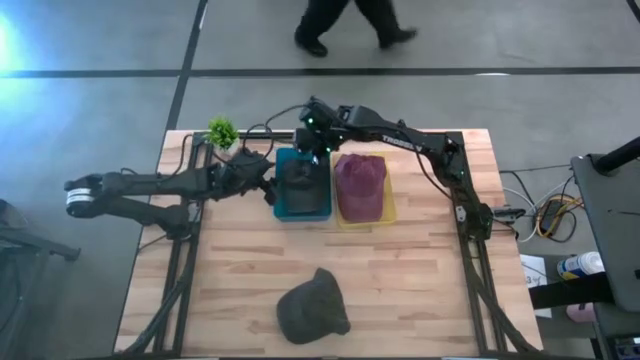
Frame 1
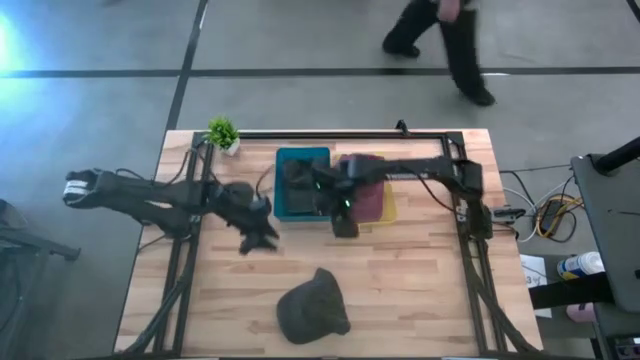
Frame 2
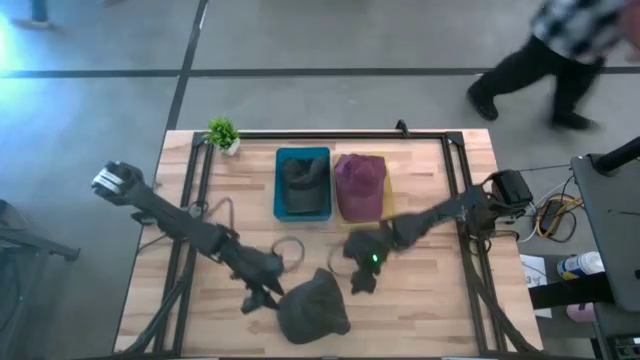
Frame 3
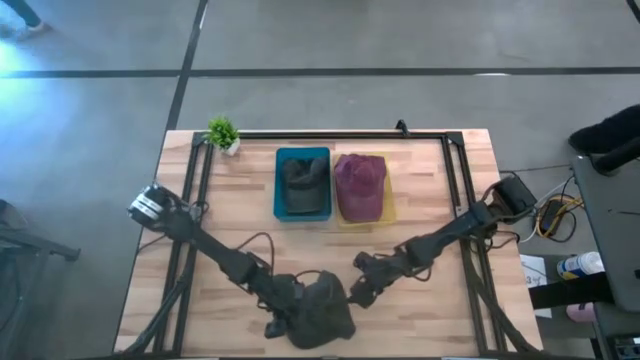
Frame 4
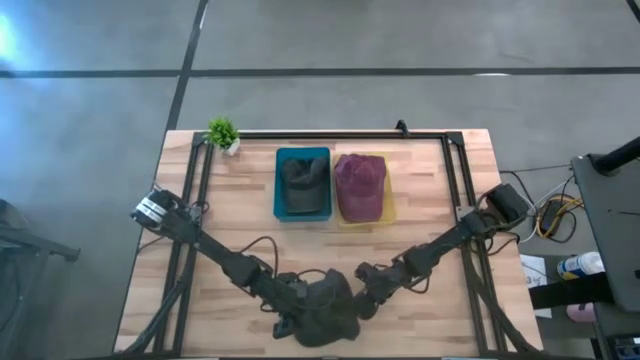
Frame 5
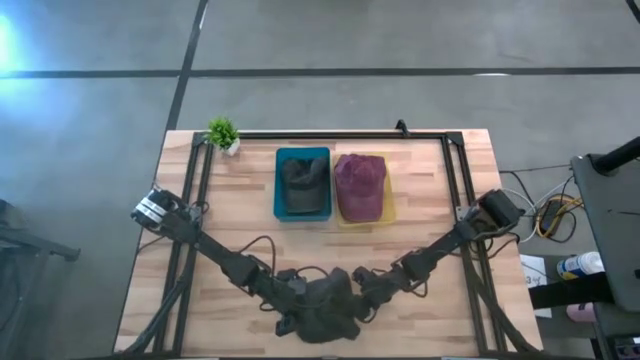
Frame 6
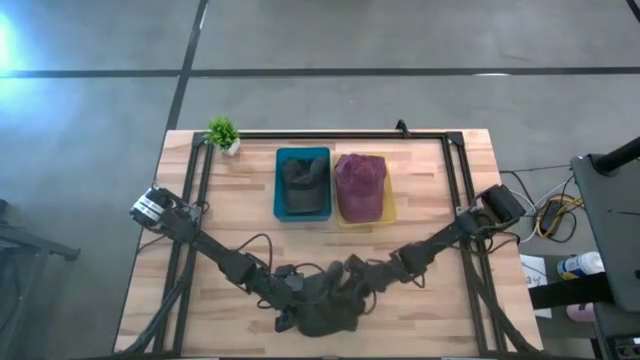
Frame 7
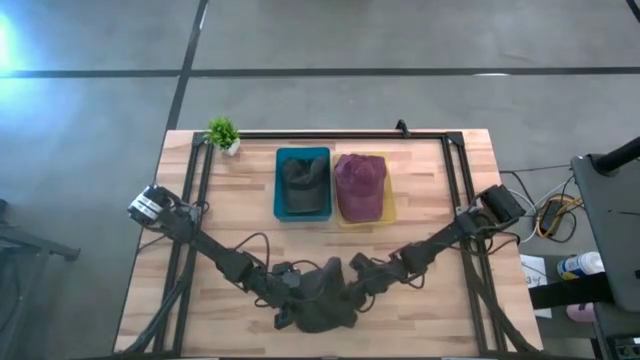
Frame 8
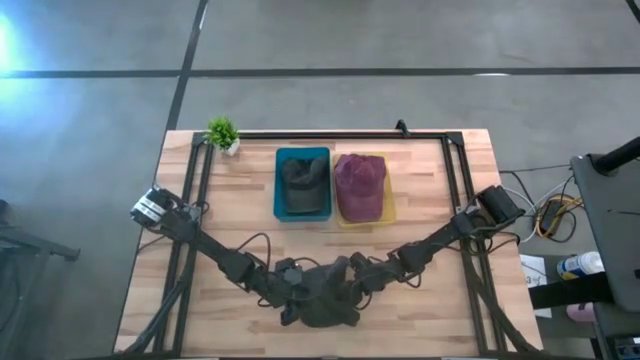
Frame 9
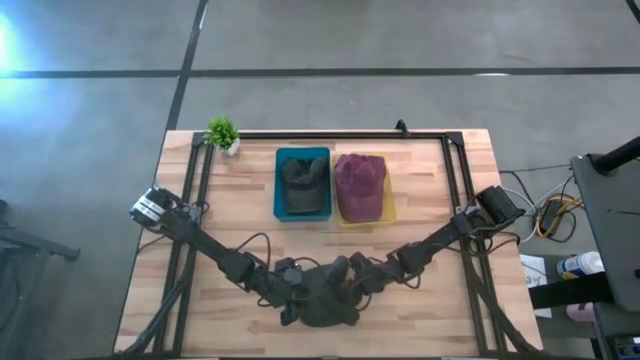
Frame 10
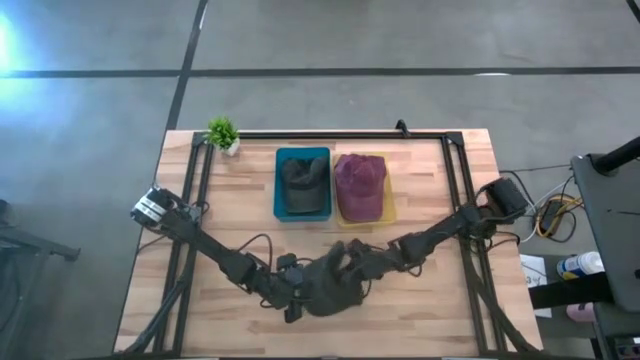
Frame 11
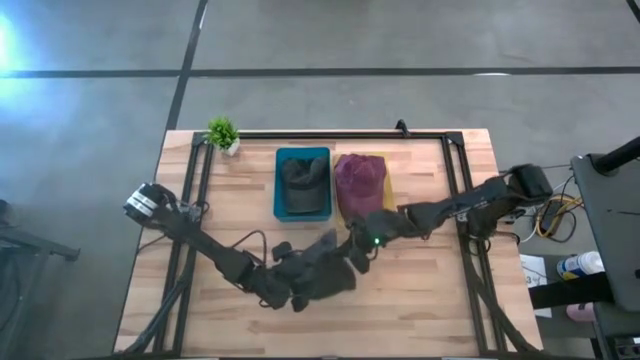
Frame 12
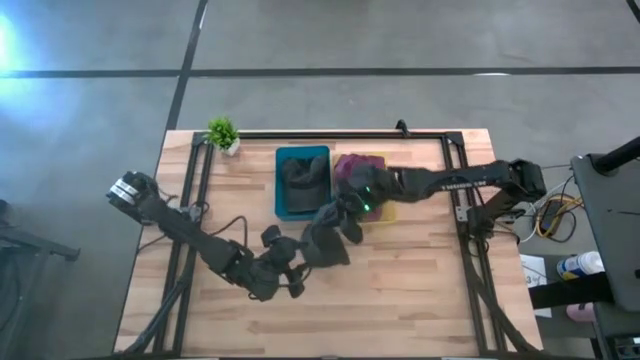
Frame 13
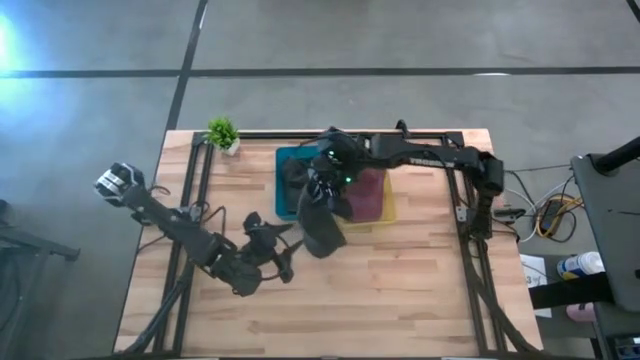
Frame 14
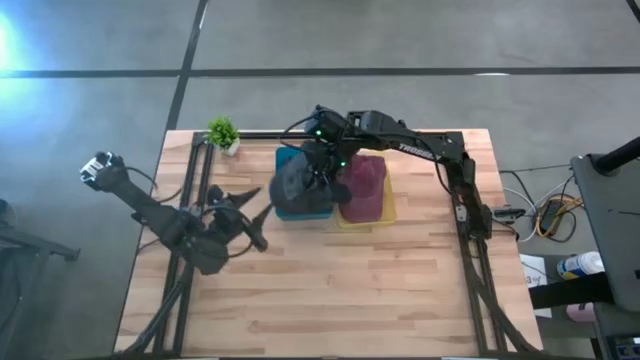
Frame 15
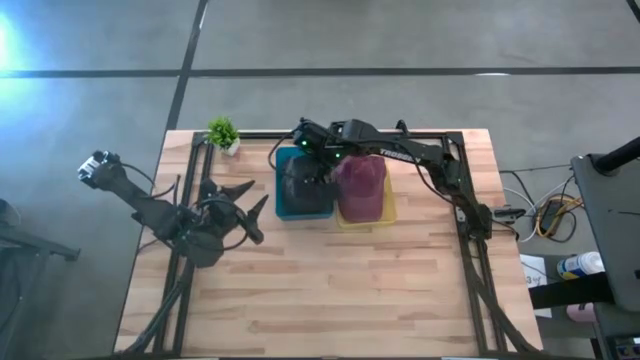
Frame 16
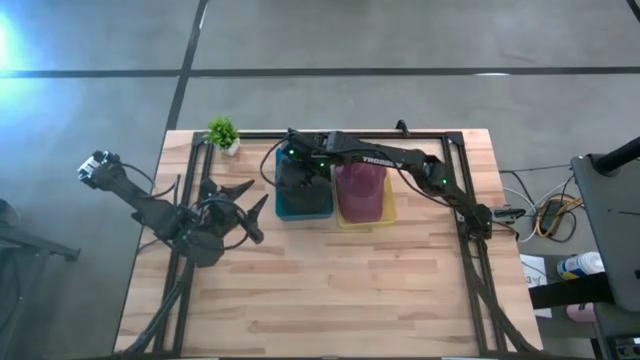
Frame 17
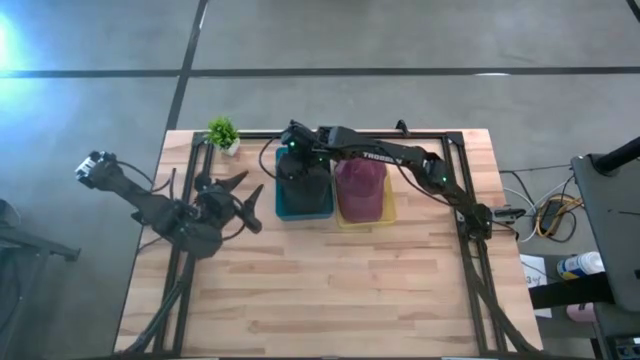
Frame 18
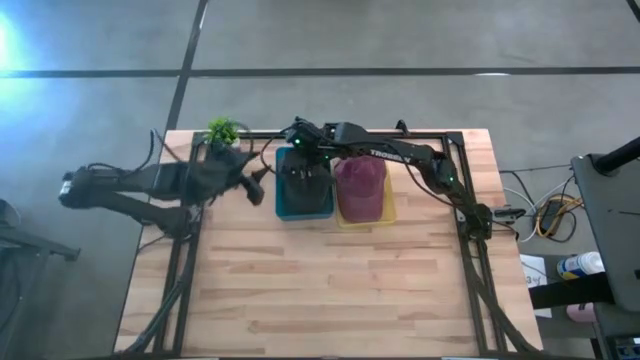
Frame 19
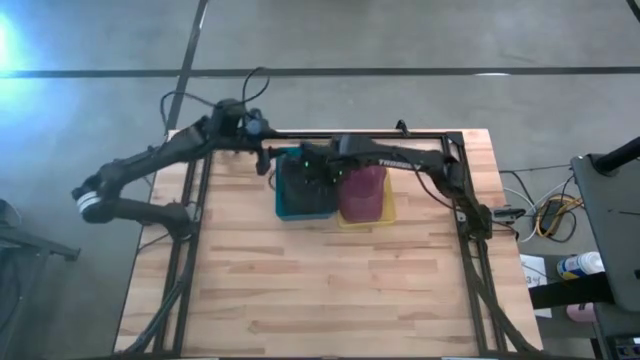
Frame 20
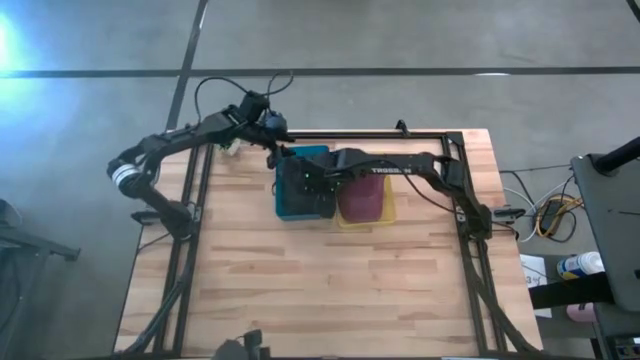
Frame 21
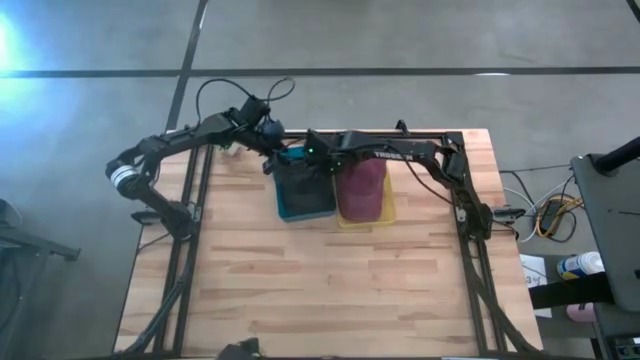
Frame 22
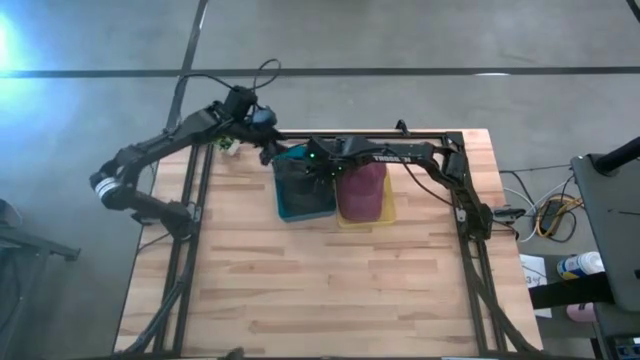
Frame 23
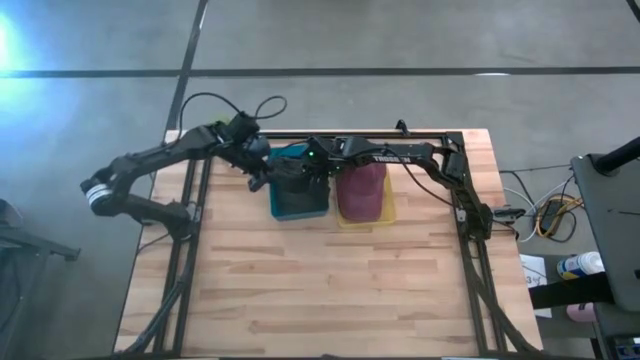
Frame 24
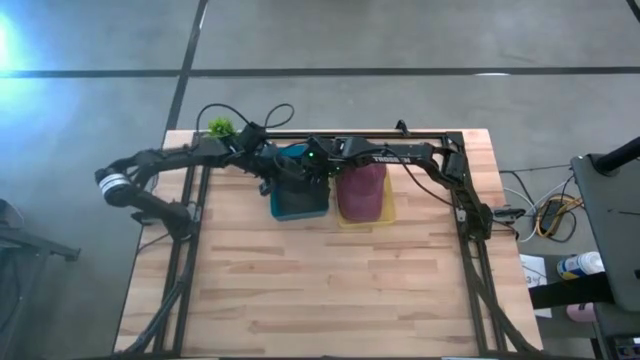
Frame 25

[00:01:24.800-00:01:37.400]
Task: Pick & Place hat
Put the gray cap into the blue bin

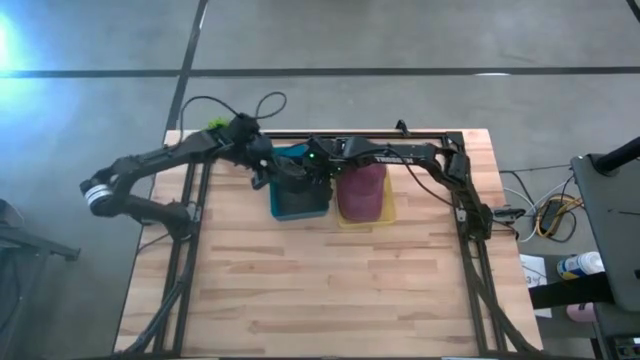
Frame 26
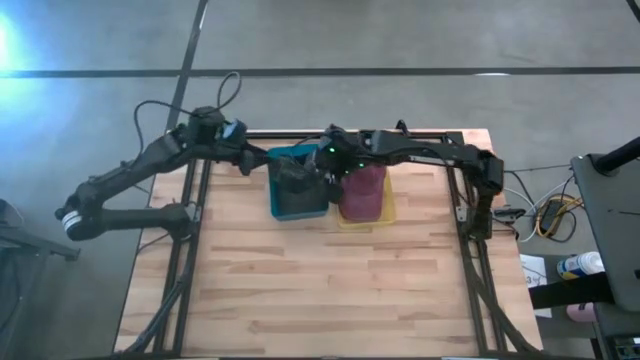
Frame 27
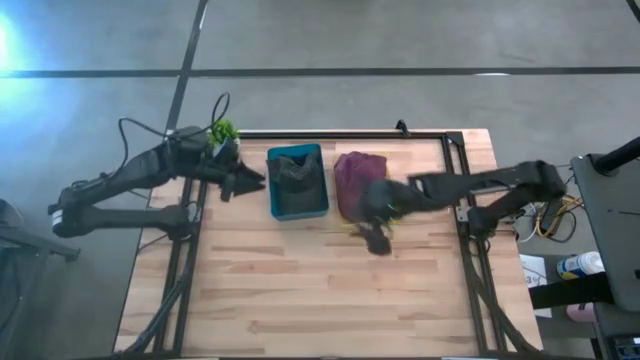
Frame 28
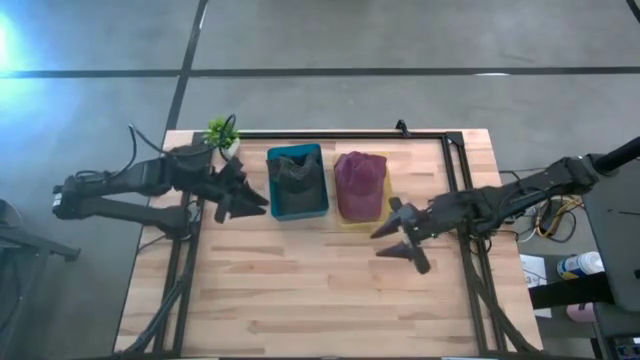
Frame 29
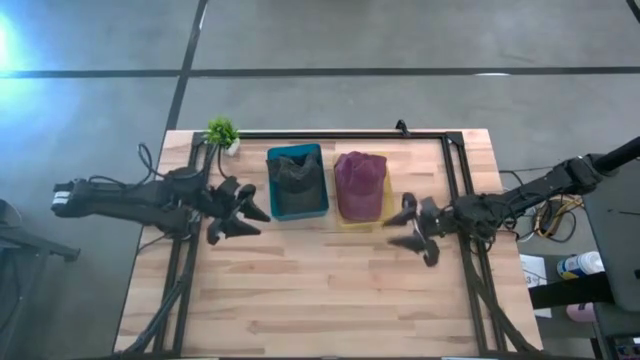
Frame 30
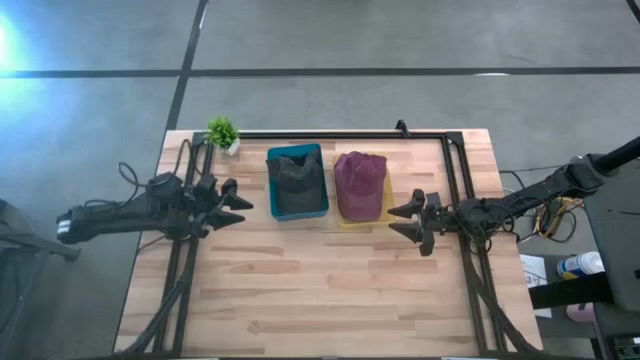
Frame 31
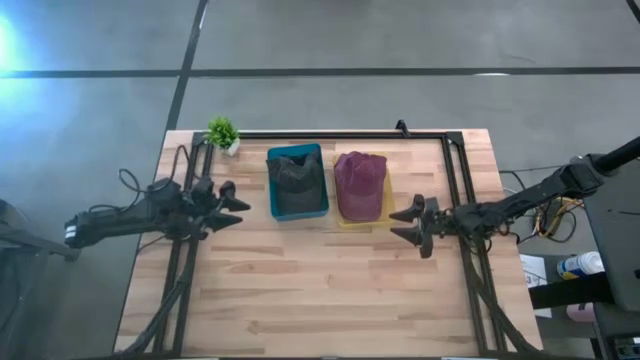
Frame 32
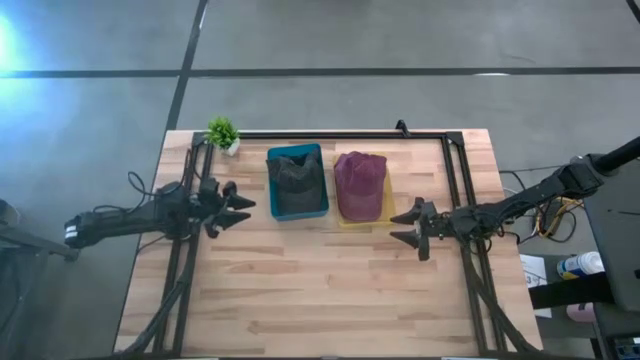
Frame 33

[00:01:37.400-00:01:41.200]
Return to Home Position

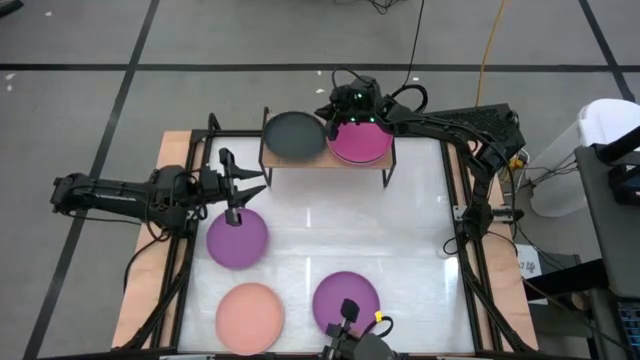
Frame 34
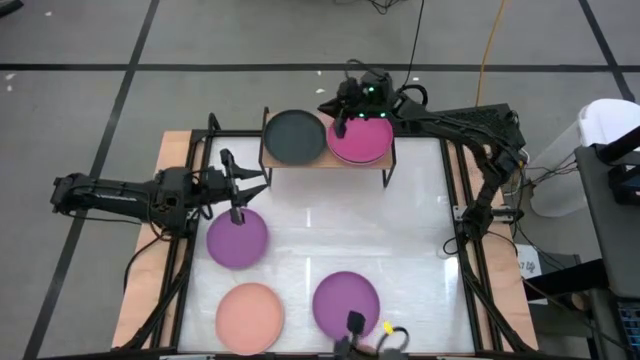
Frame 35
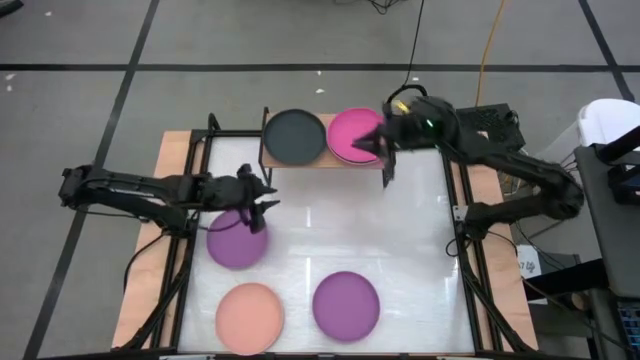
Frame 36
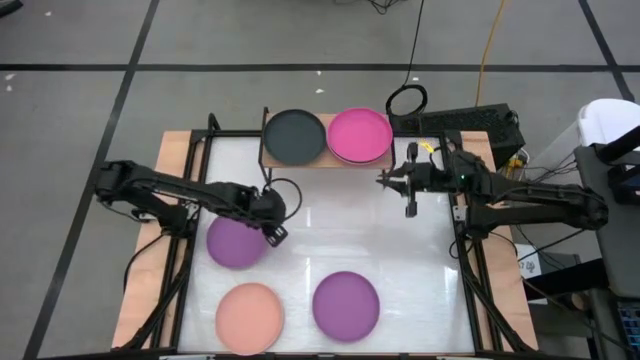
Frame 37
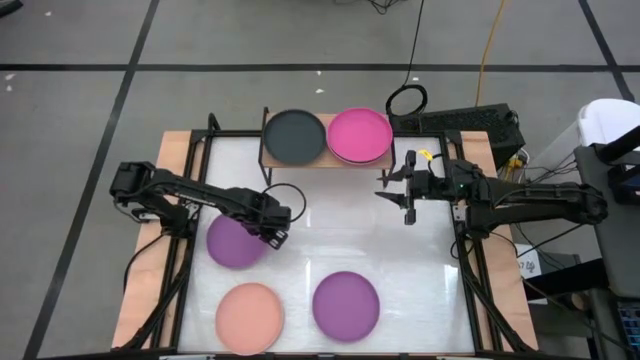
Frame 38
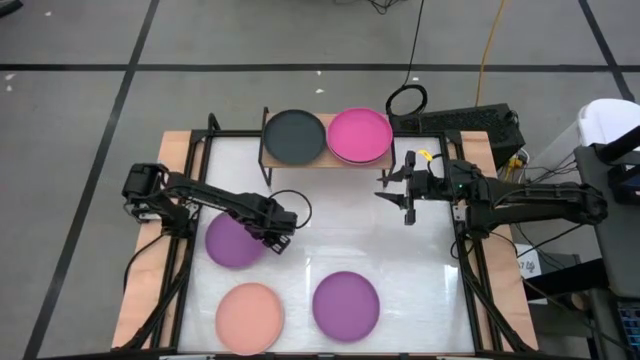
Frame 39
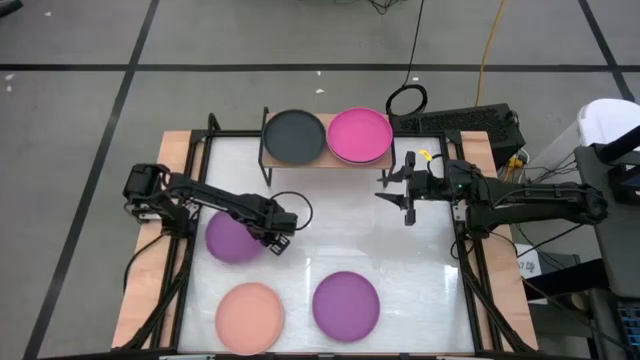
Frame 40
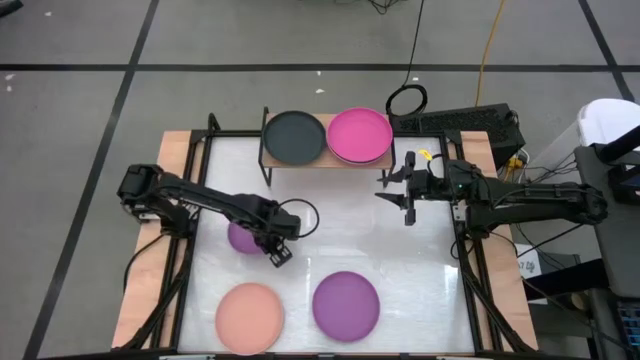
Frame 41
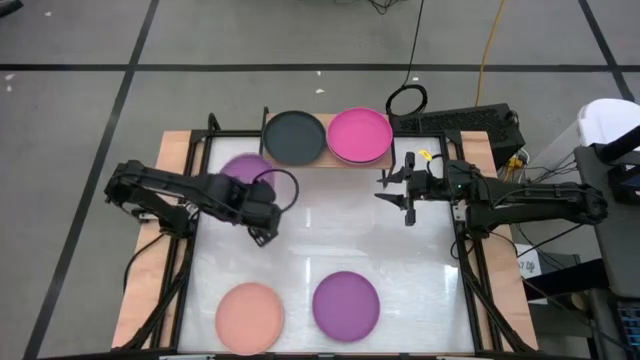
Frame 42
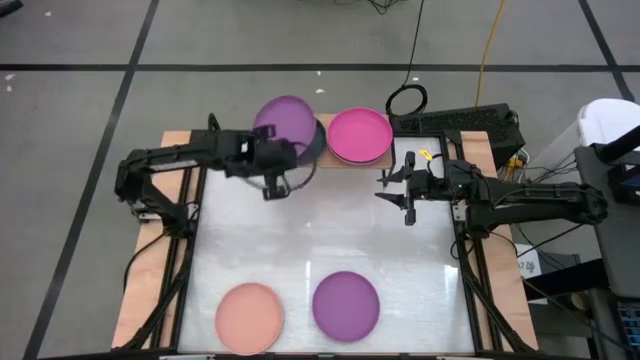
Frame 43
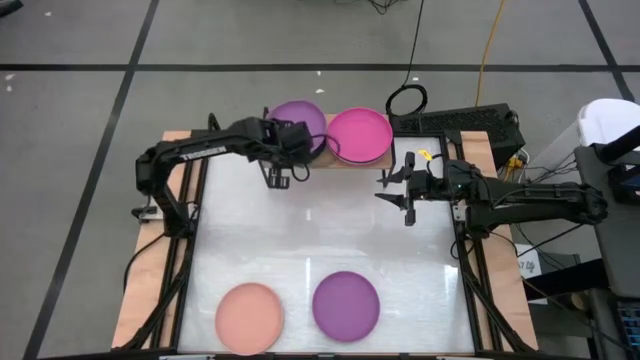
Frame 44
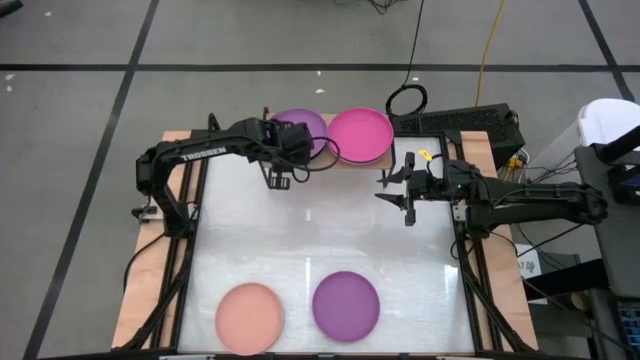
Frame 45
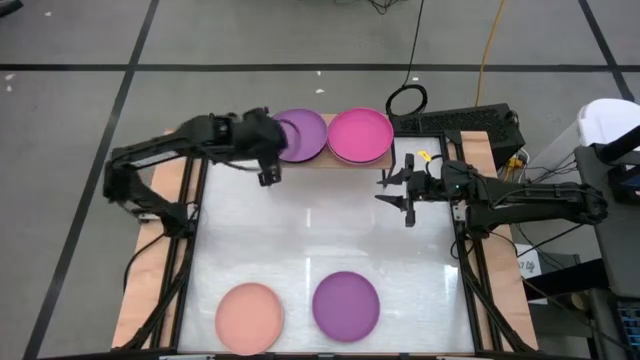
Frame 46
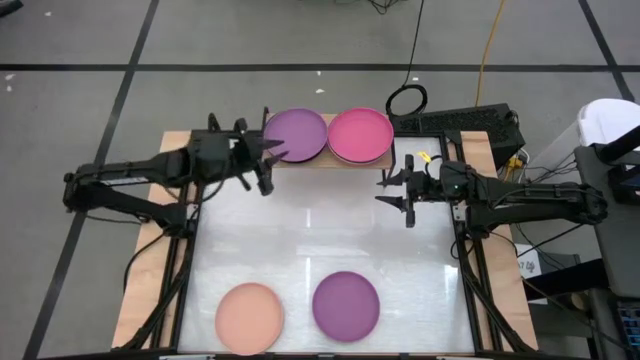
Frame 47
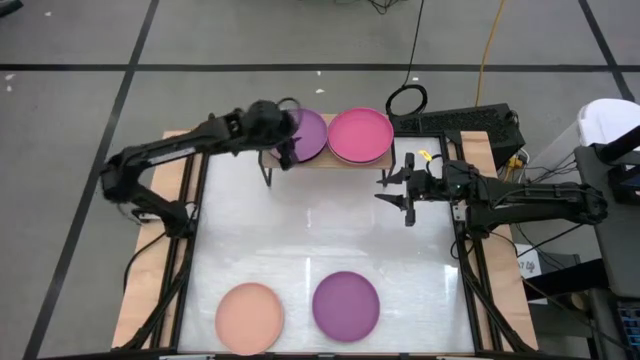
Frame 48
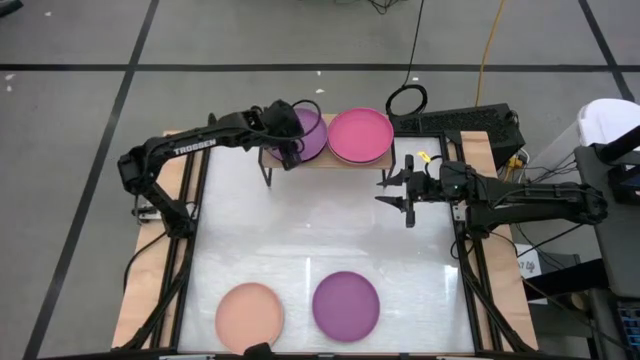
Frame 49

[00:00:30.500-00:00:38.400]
Task: Place and stack plates onto a shelf
Stack the top purple plate on top of the black plate on the shelf
